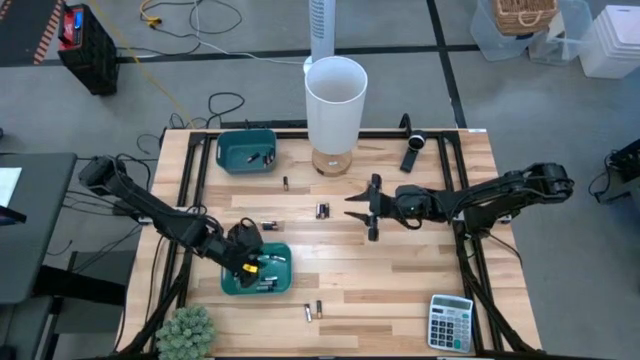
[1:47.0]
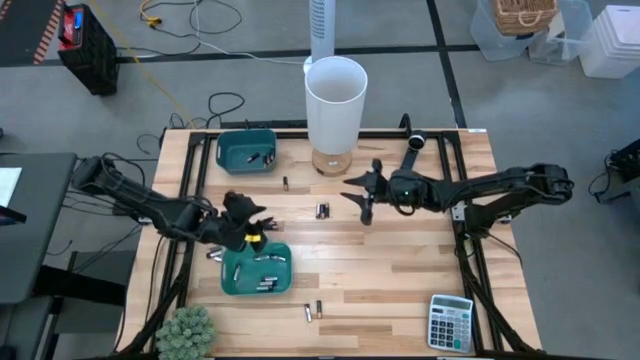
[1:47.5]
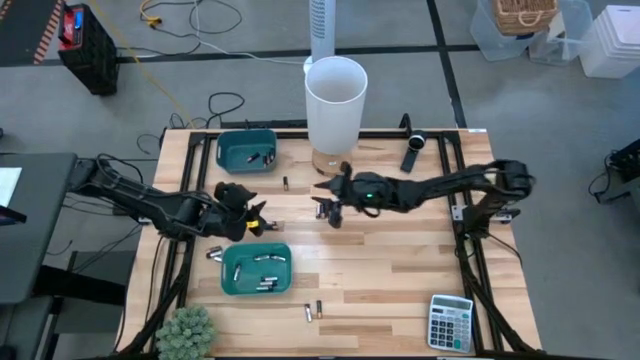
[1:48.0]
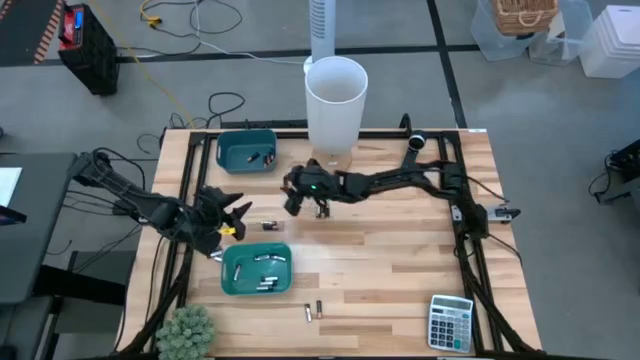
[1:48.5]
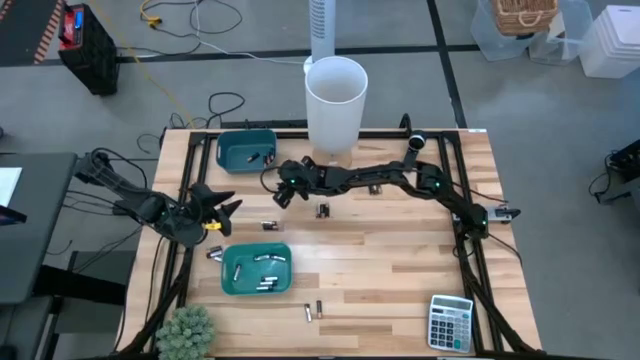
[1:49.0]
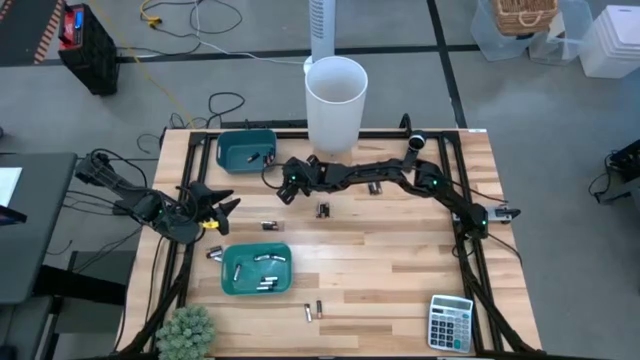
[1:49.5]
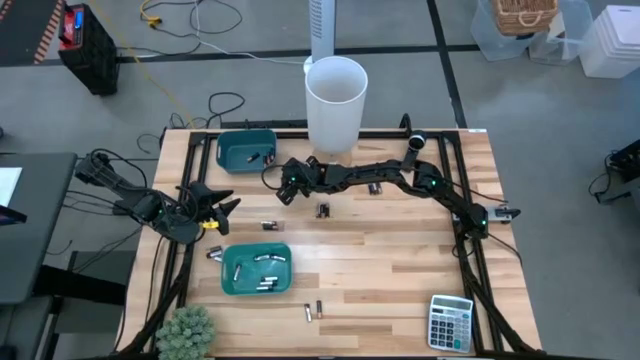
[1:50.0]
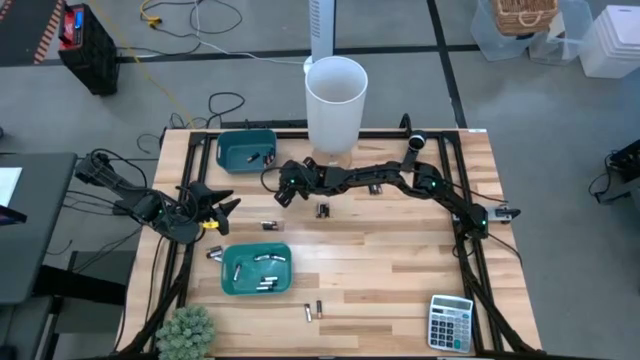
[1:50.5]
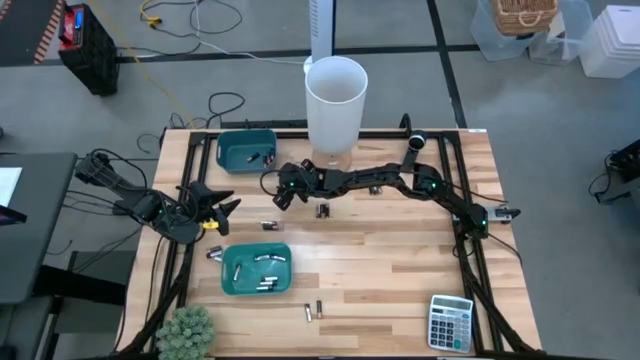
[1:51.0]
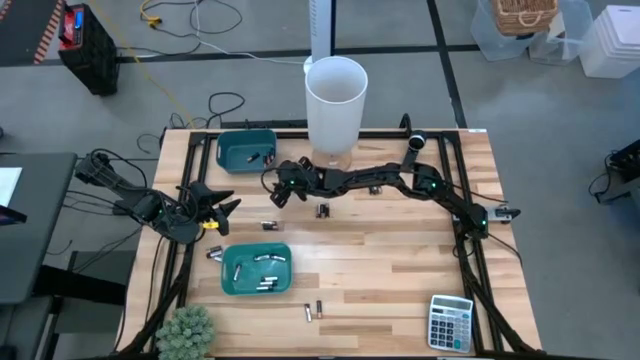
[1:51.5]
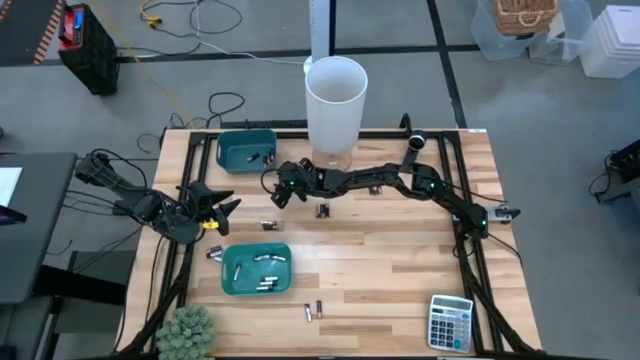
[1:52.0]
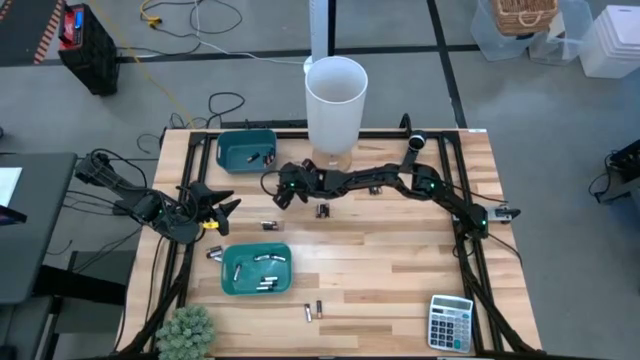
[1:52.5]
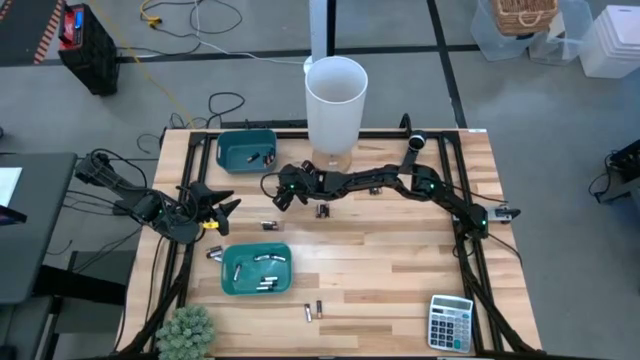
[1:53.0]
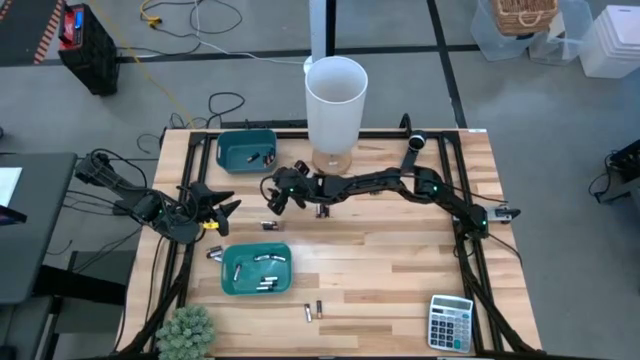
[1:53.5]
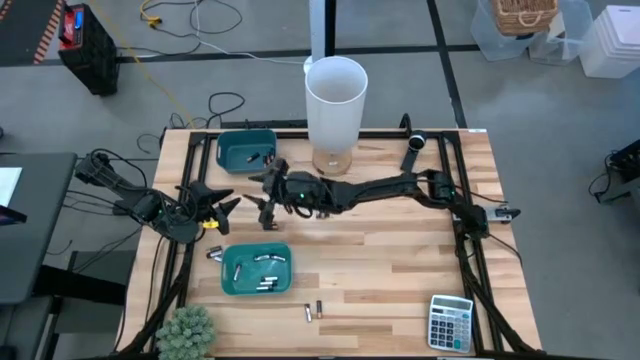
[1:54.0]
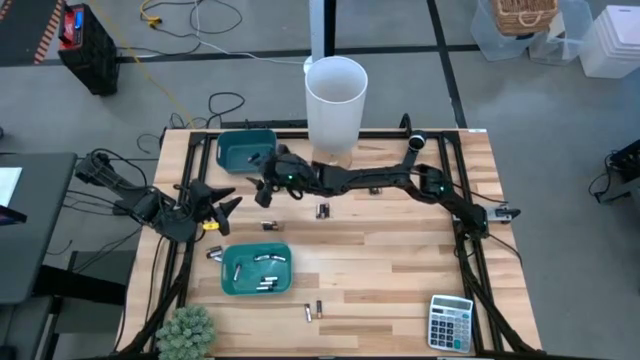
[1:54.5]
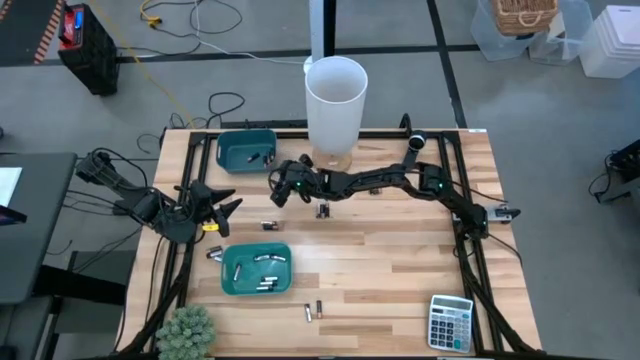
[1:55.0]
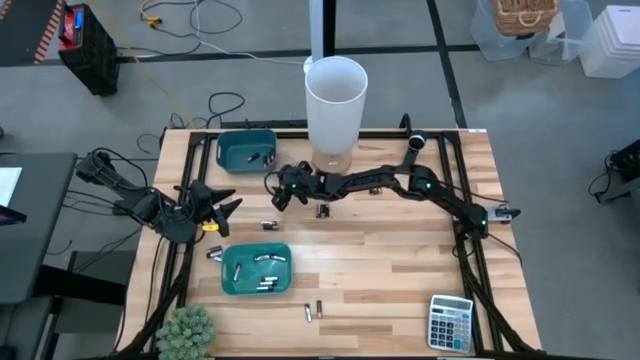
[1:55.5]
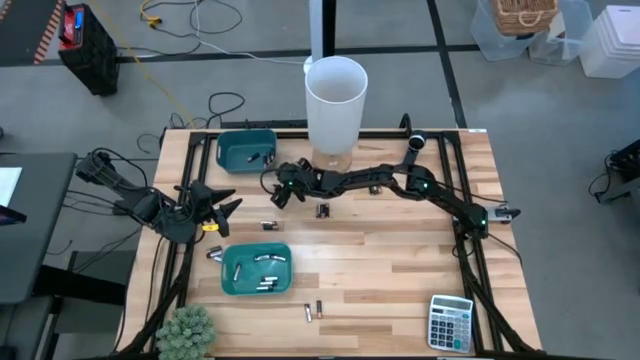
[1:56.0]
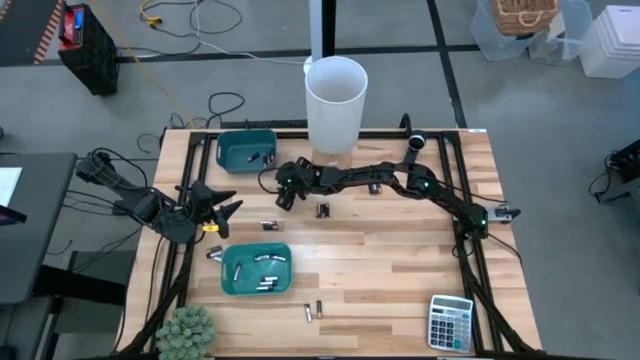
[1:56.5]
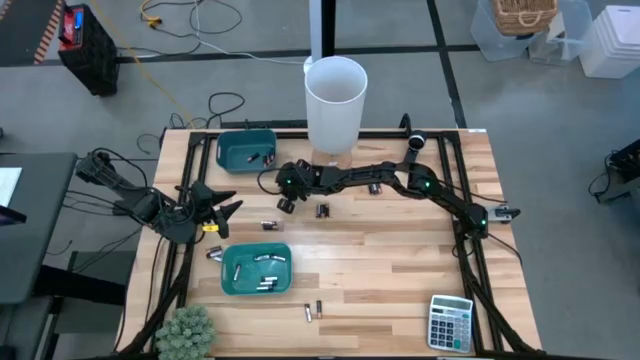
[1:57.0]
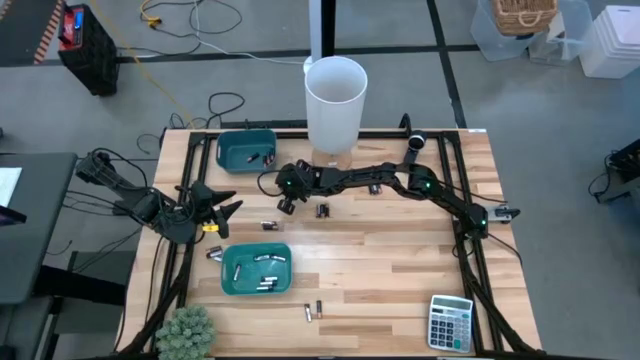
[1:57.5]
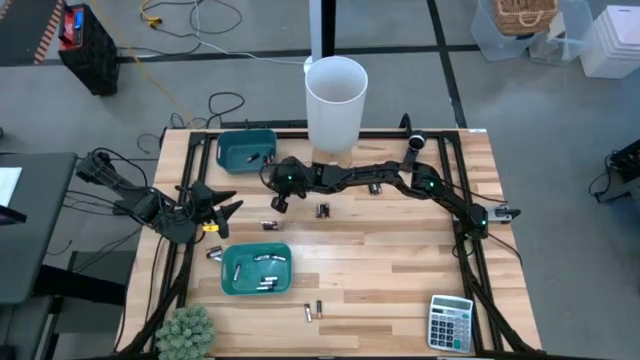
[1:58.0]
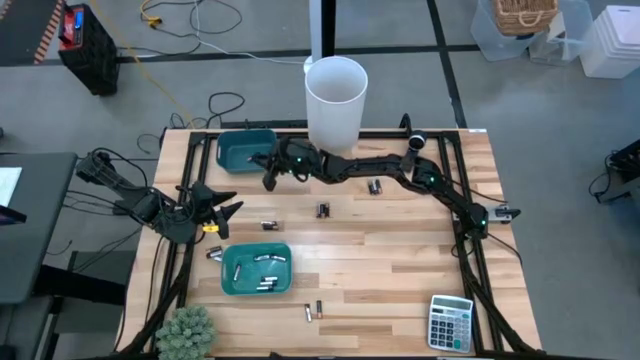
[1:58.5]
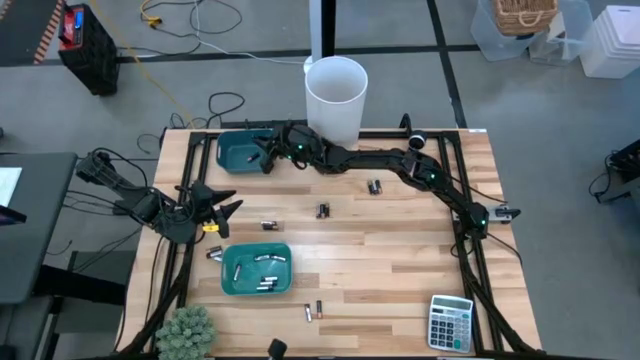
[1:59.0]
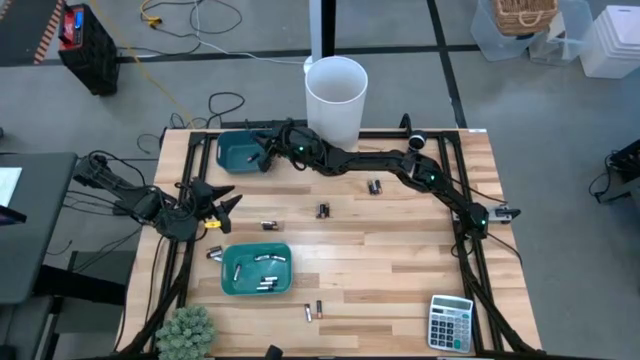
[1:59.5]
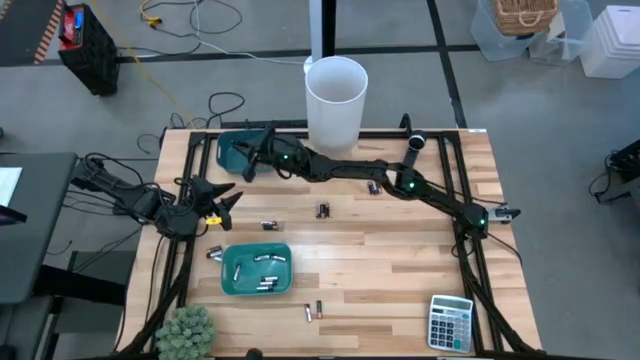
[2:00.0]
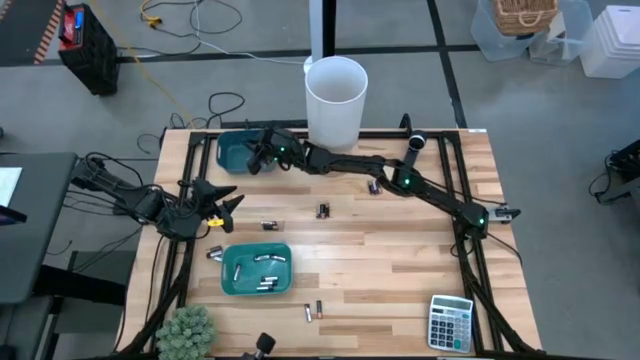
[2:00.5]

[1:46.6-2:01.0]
Task: Sort batteries
Put the black battery into the blue bin

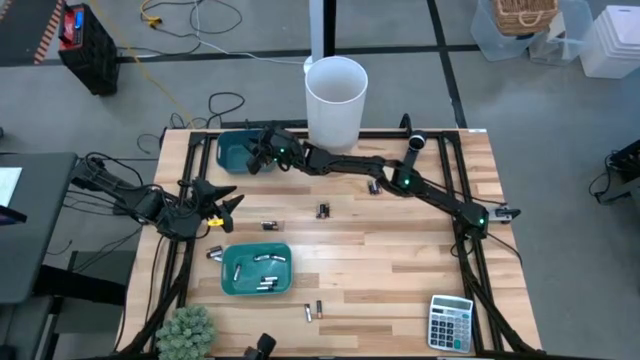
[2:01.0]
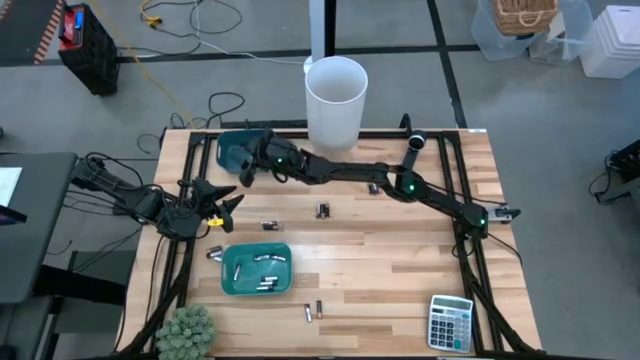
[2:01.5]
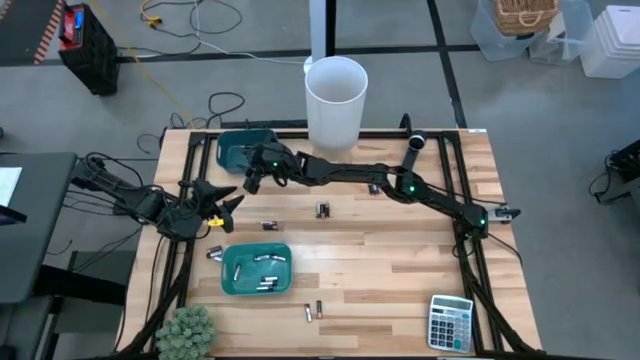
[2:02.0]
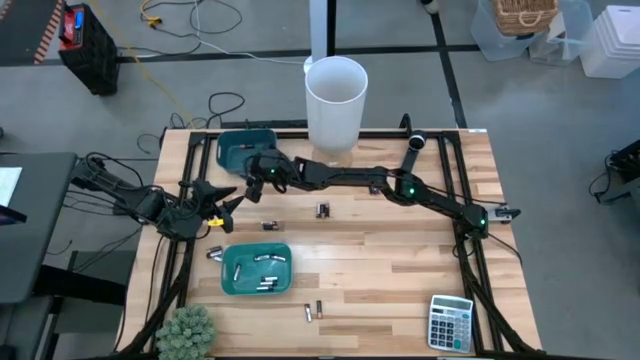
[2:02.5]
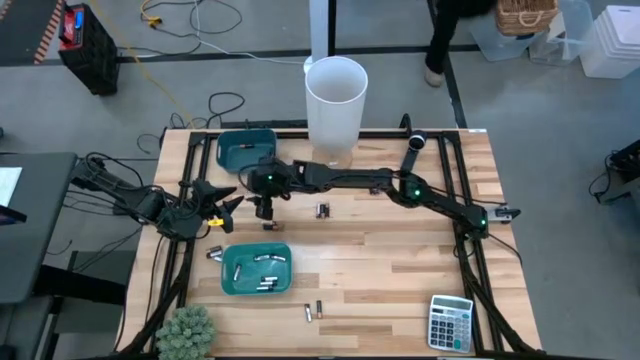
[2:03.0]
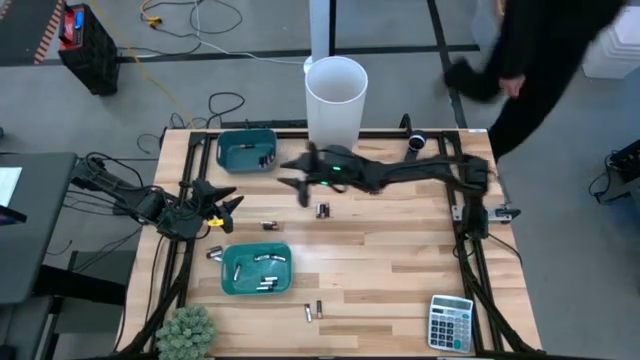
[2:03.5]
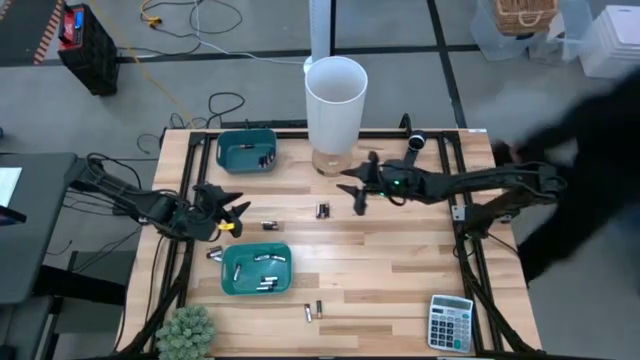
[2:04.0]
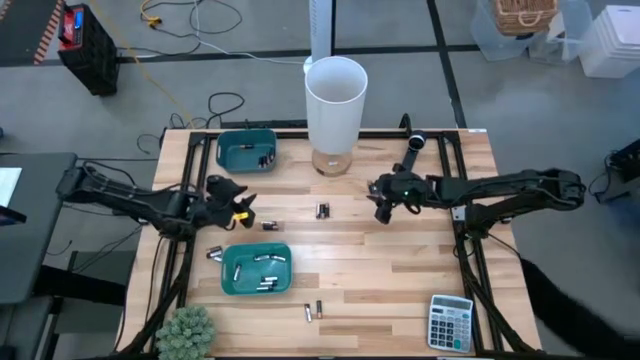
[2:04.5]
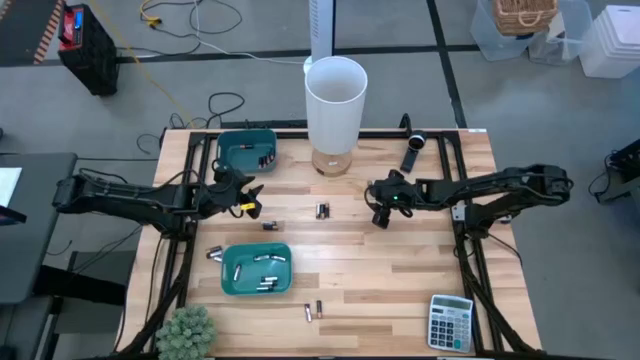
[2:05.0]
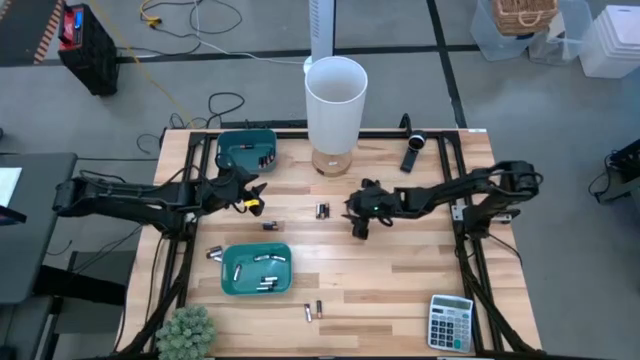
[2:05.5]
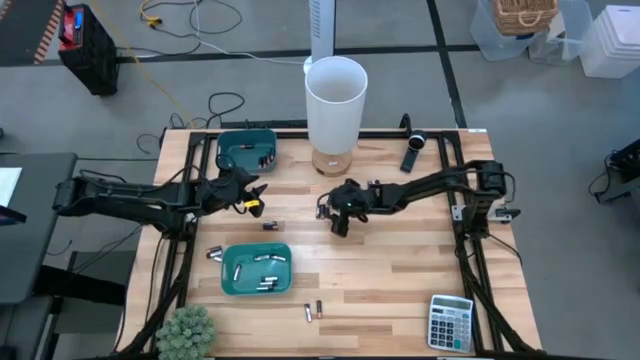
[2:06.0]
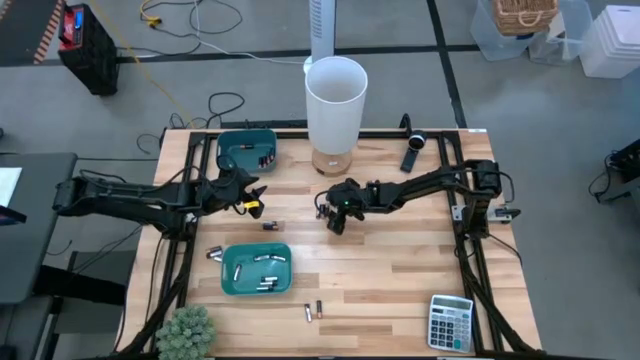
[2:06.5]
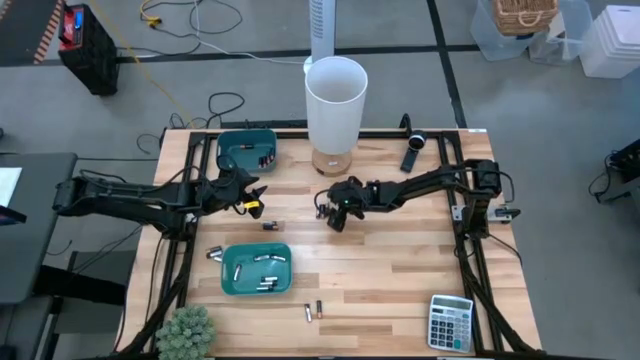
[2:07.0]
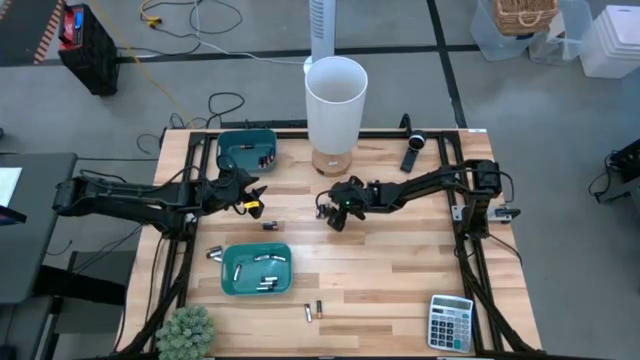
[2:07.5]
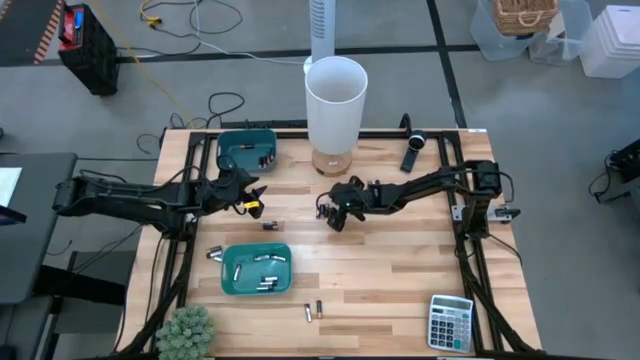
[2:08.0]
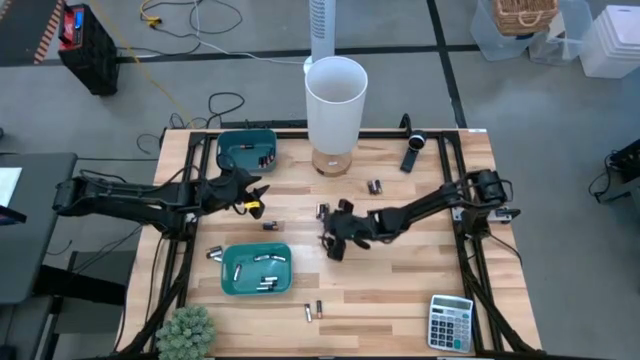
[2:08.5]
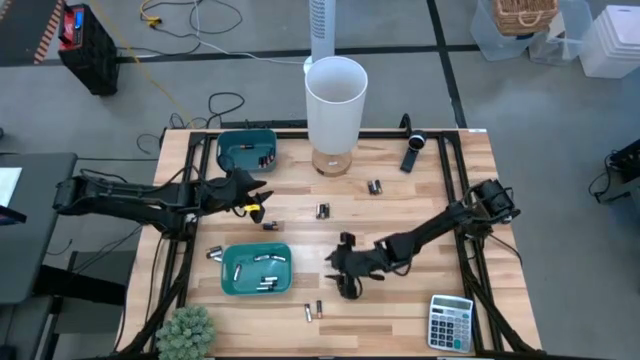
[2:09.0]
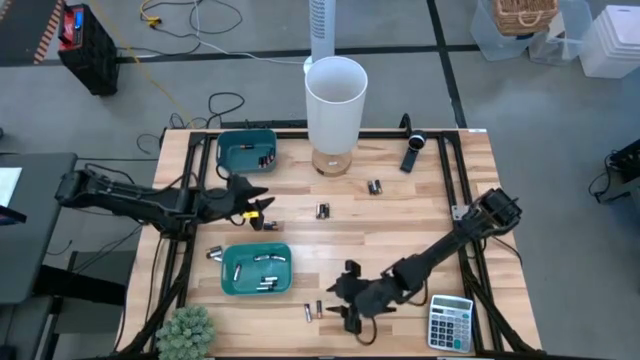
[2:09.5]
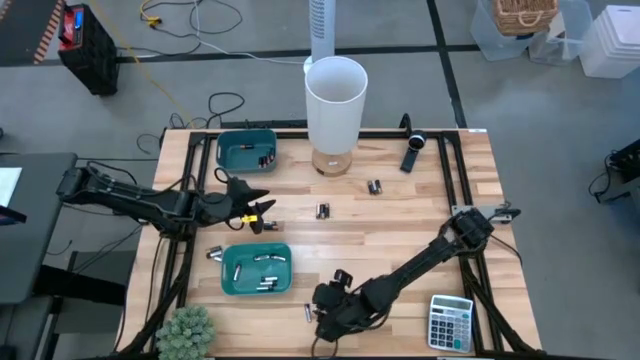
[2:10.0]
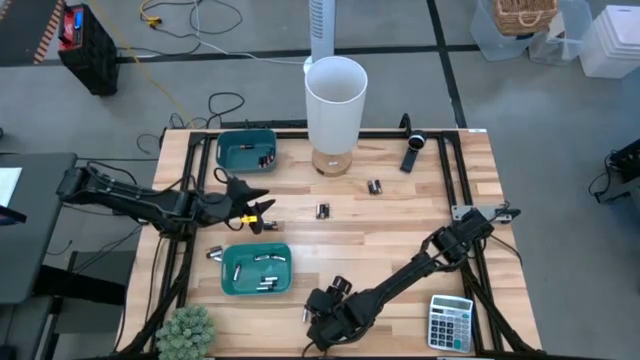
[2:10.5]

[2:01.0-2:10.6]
Put the black battery into the blue bin
